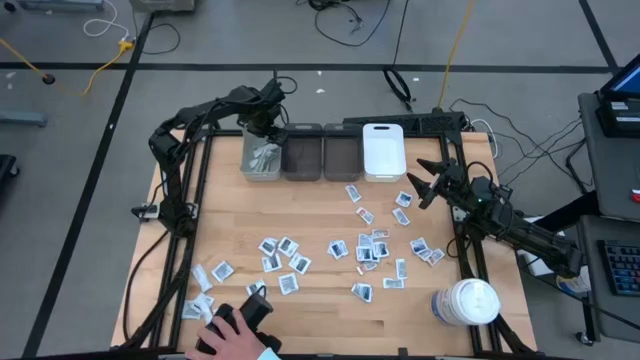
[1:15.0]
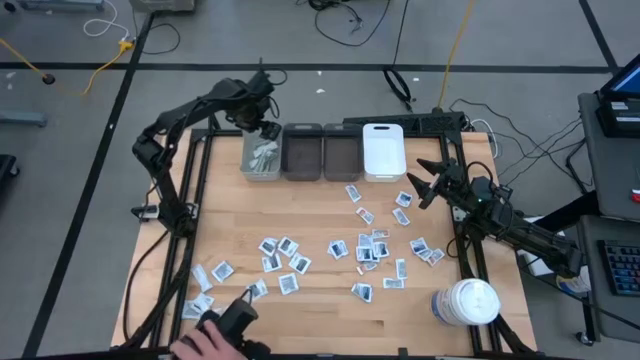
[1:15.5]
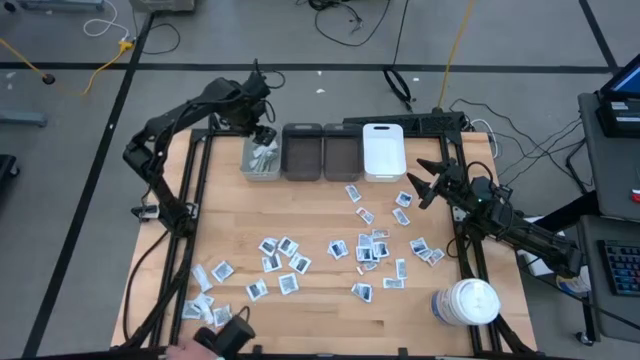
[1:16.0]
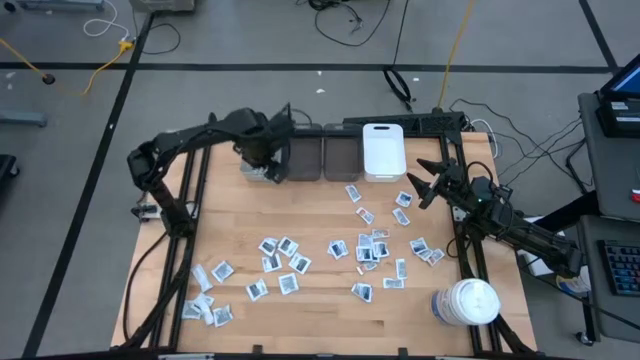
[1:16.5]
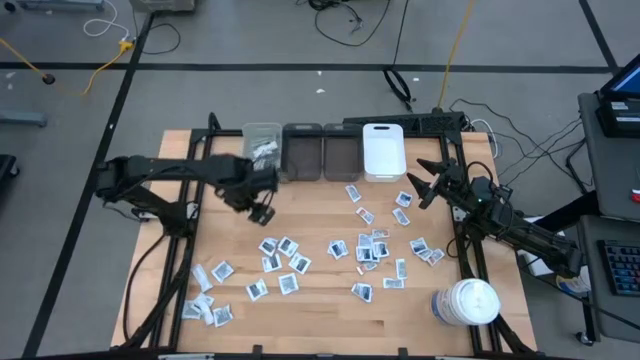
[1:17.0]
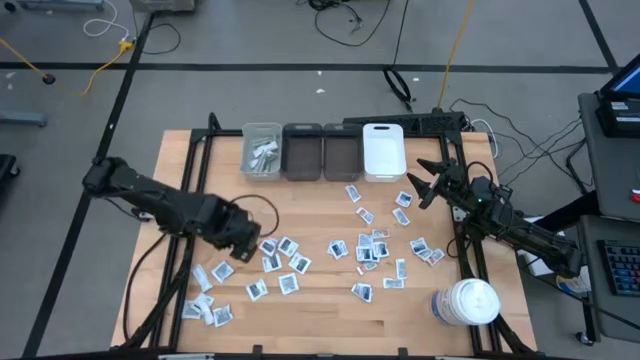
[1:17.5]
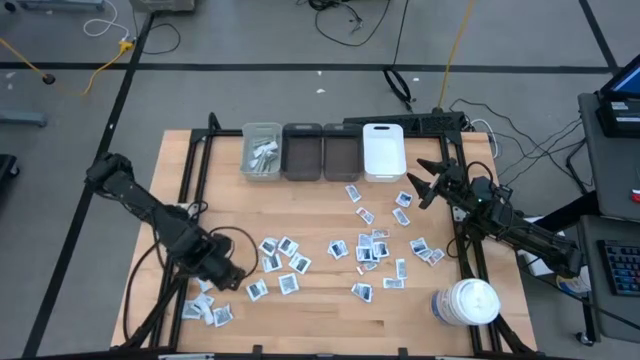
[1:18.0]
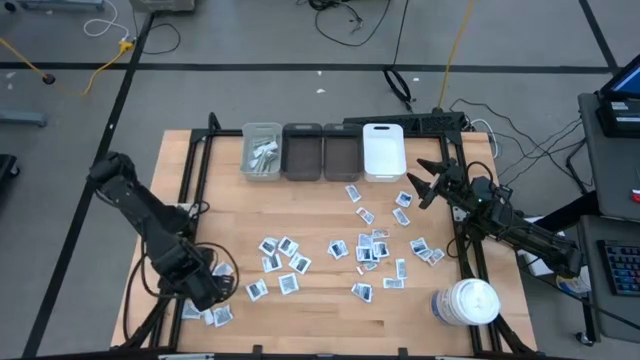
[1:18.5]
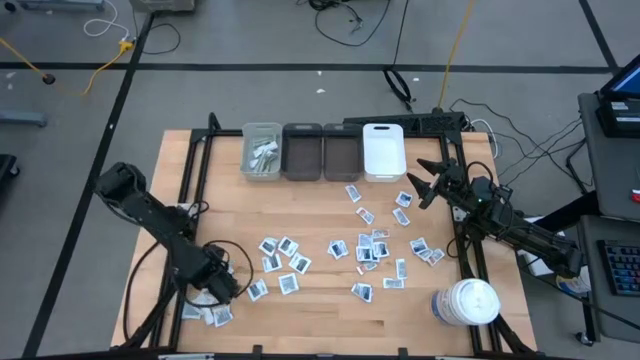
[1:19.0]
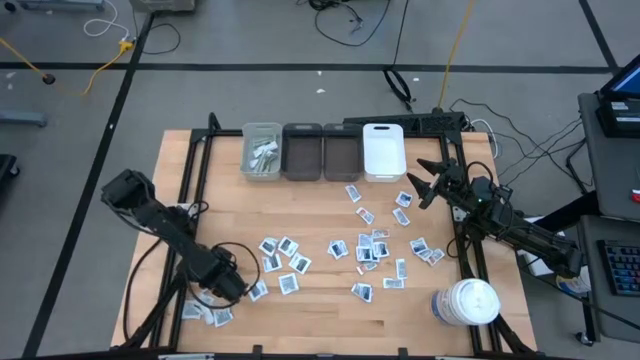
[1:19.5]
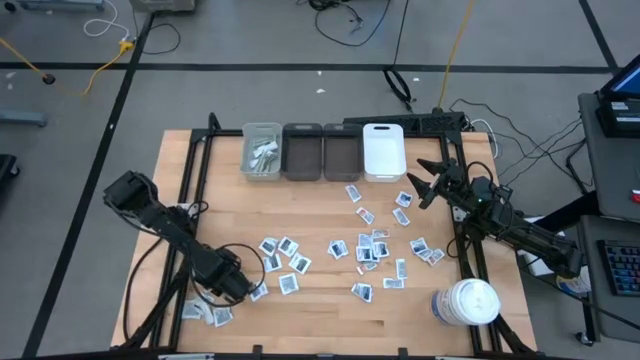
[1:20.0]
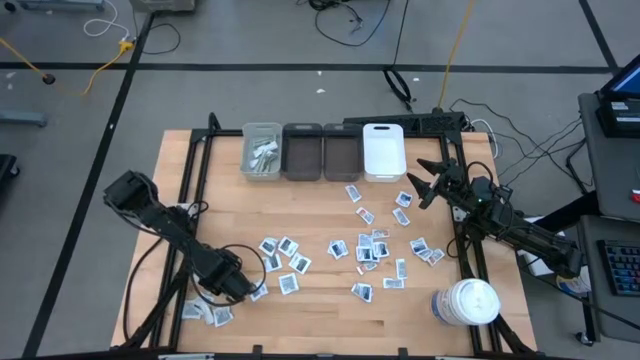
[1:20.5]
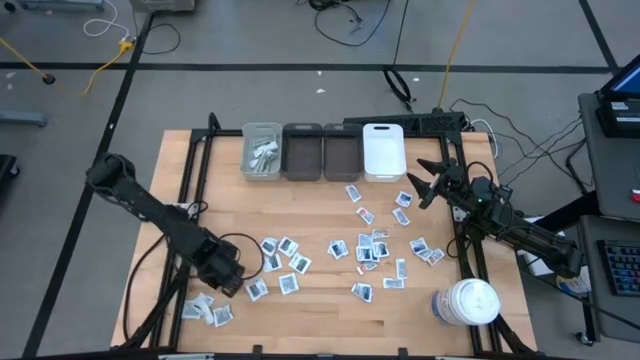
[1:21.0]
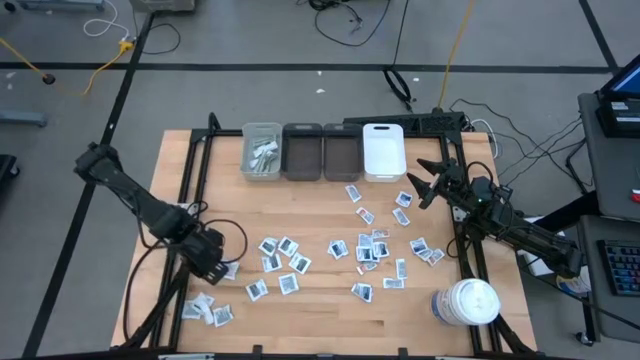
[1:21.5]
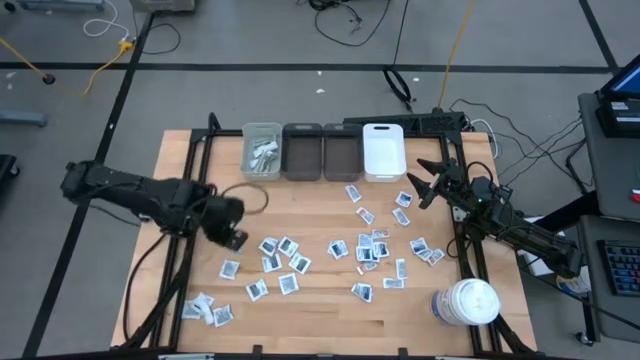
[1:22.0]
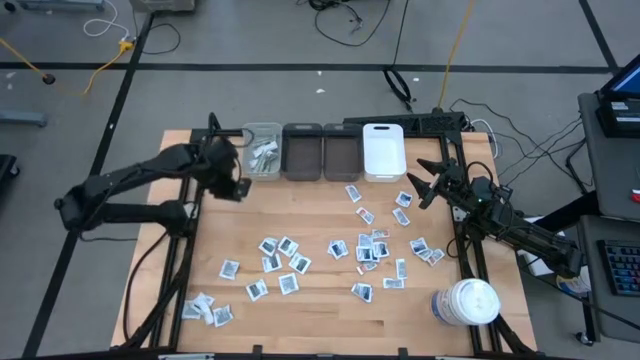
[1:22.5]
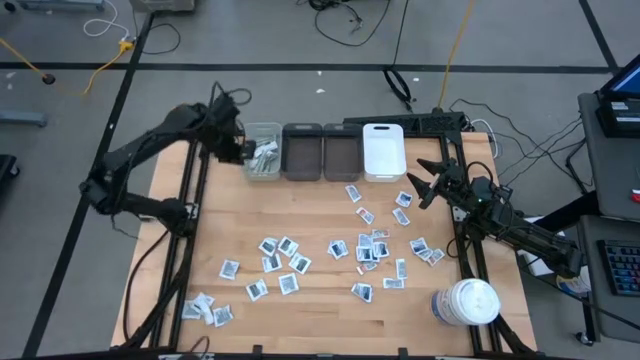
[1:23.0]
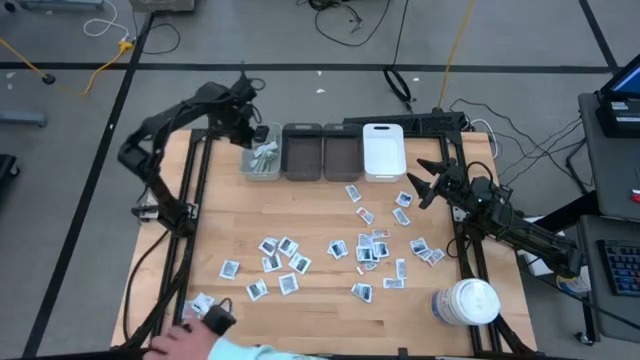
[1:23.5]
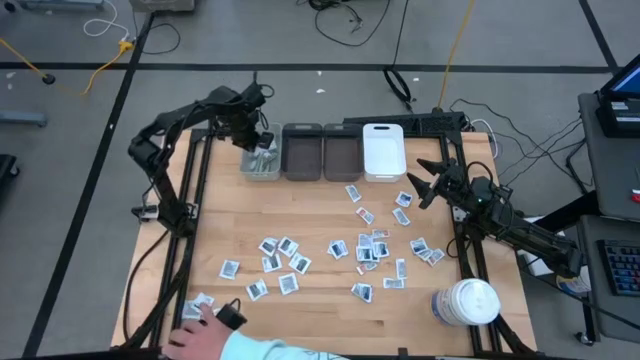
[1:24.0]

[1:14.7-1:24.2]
Task: Pick & Place First Aid Supplies
Put the bandage into the gray bin

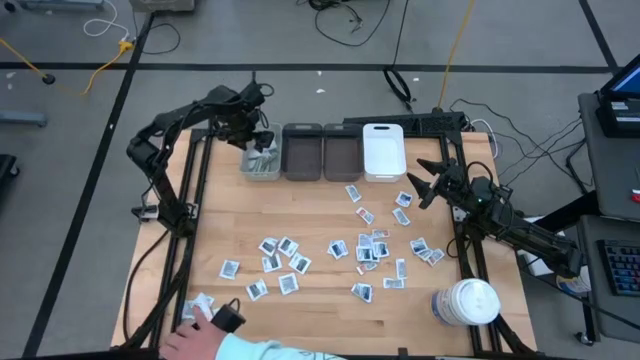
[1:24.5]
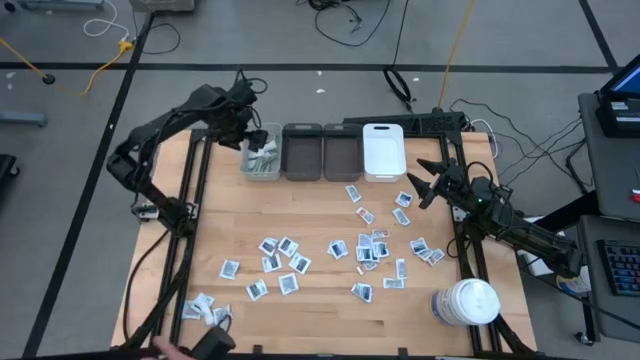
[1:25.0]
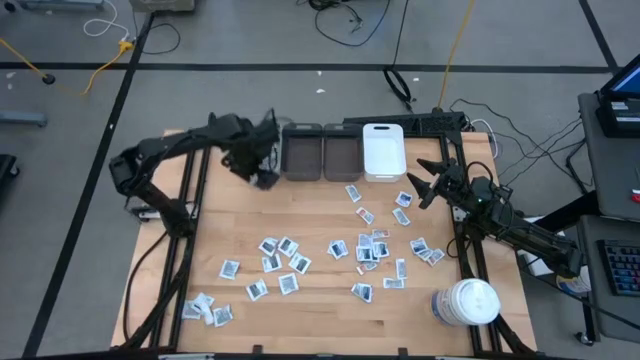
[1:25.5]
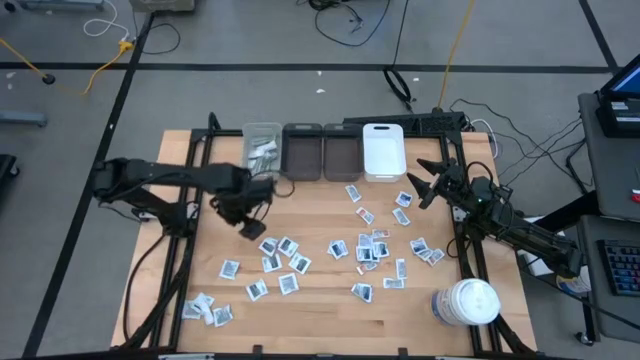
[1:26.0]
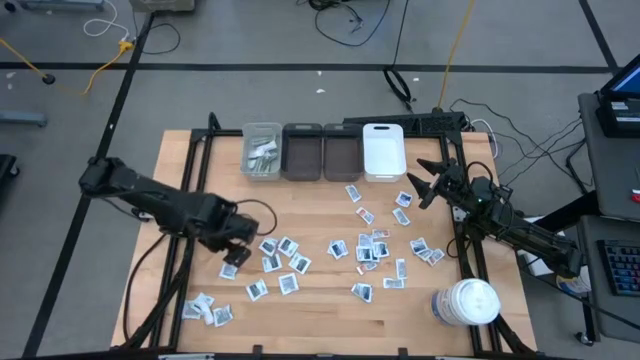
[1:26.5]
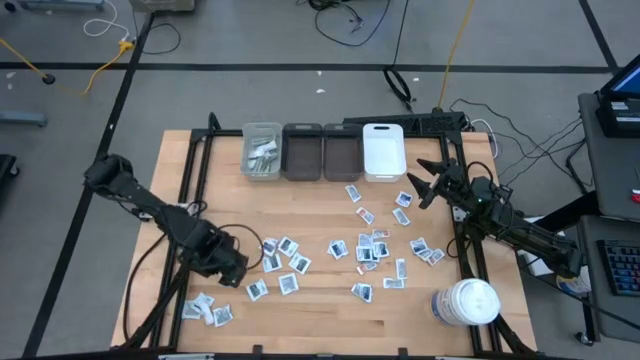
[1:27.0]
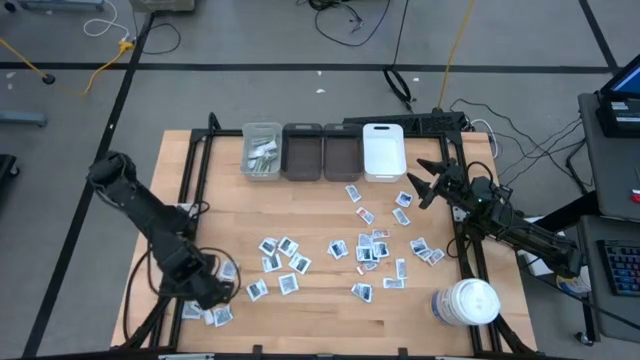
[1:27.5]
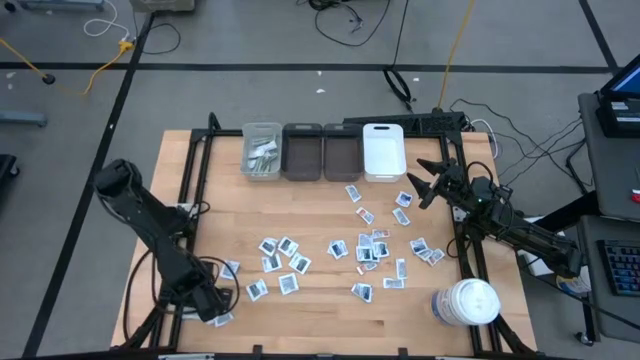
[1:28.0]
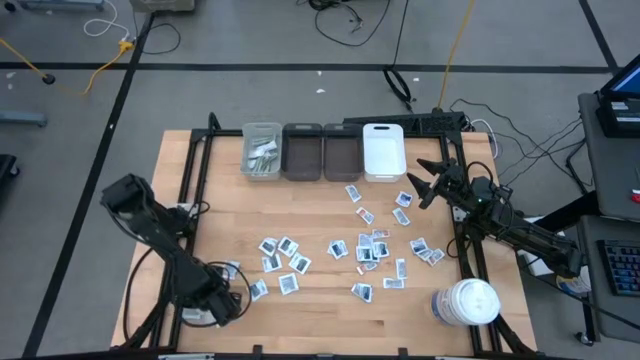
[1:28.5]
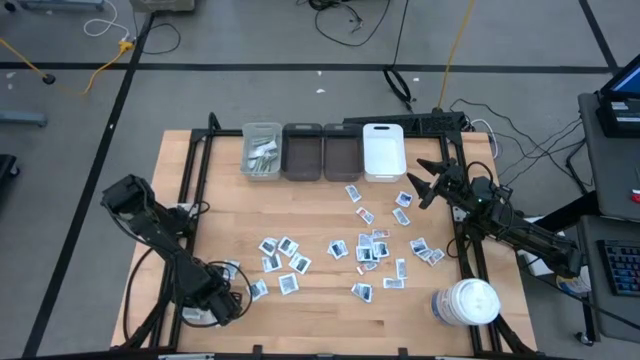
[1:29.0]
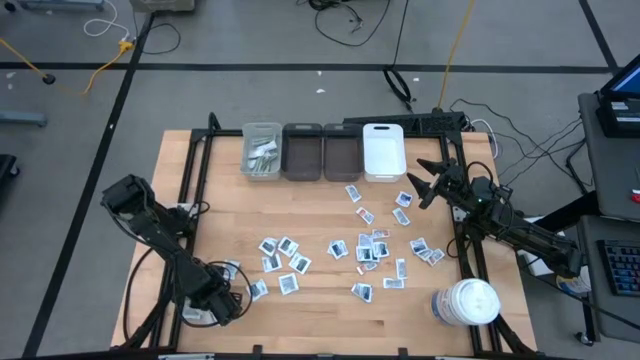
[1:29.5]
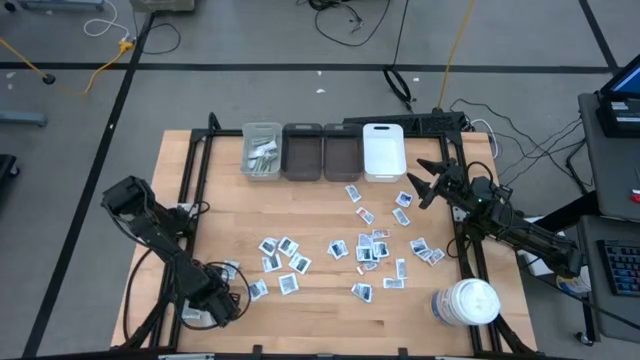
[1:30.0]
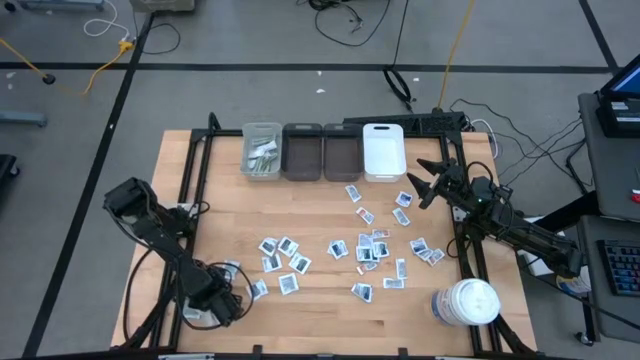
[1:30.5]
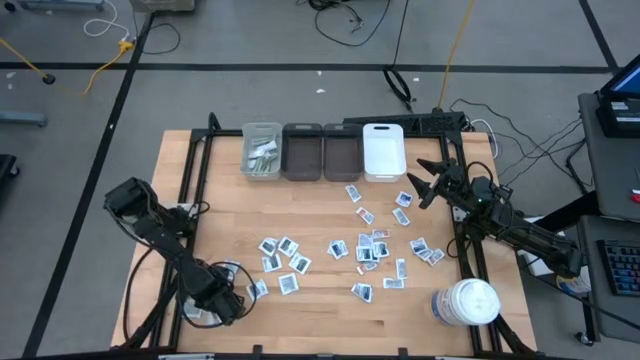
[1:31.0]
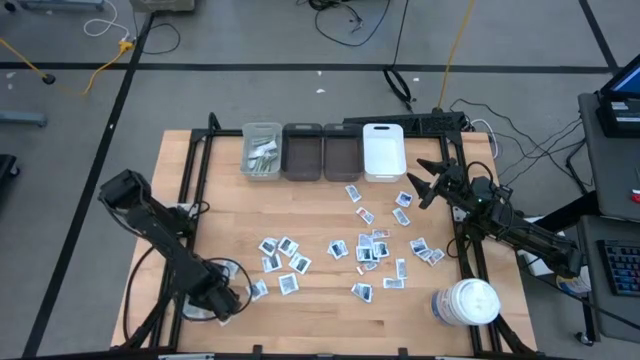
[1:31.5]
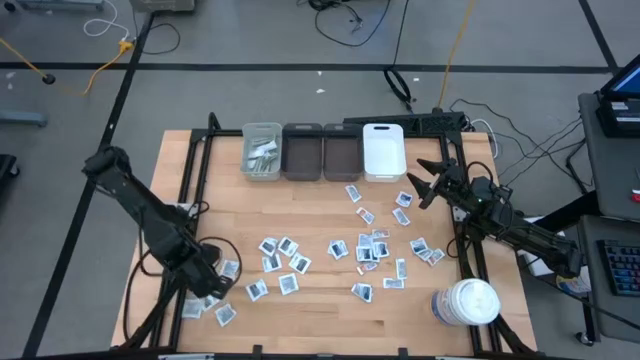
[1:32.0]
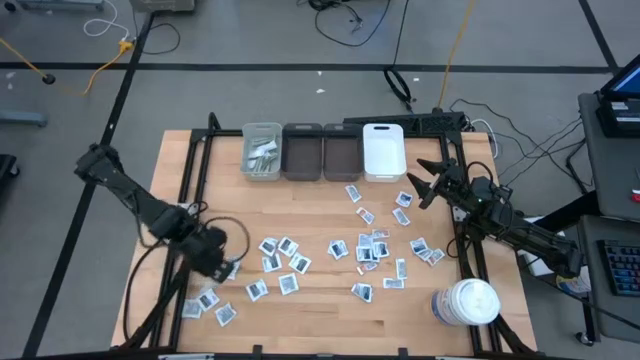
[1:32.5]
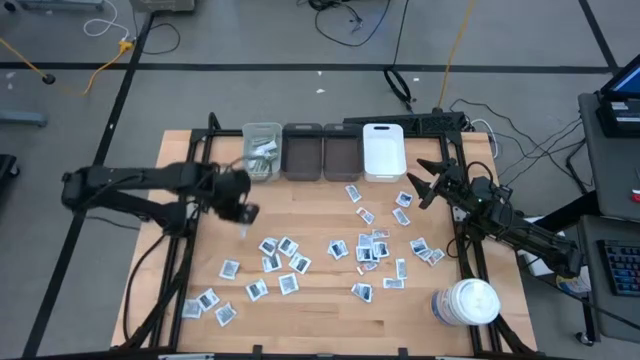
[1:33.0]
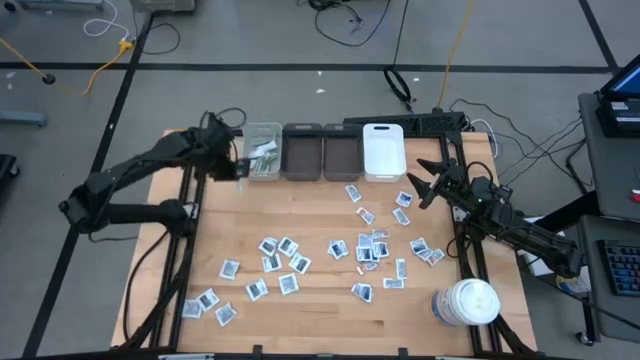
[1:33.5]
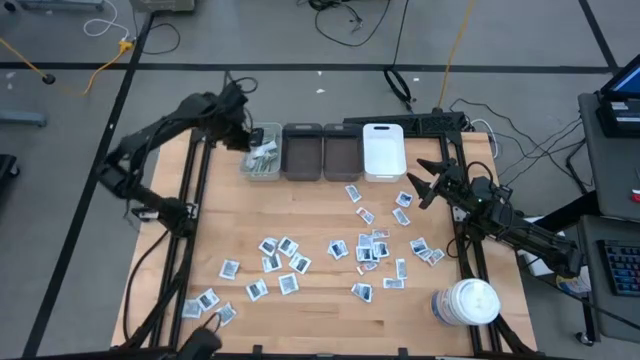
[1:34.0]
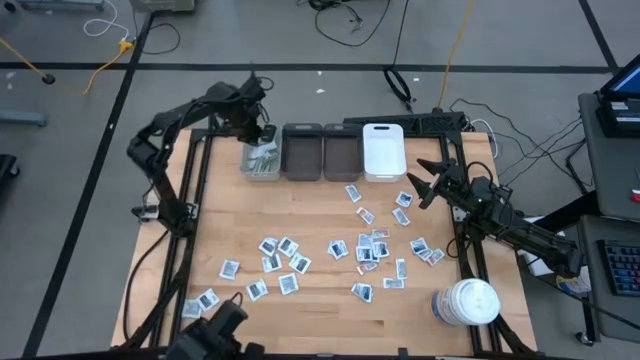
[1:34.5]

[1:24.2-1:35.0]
Put the bandage into the gray bin

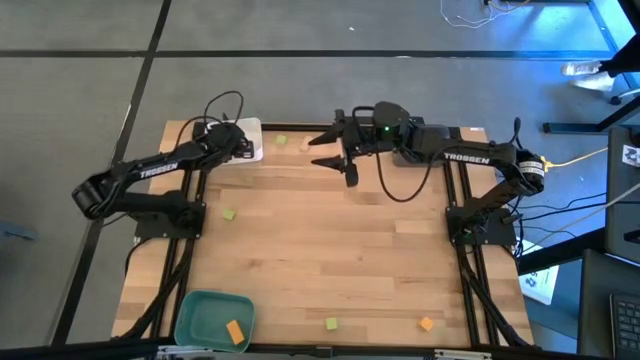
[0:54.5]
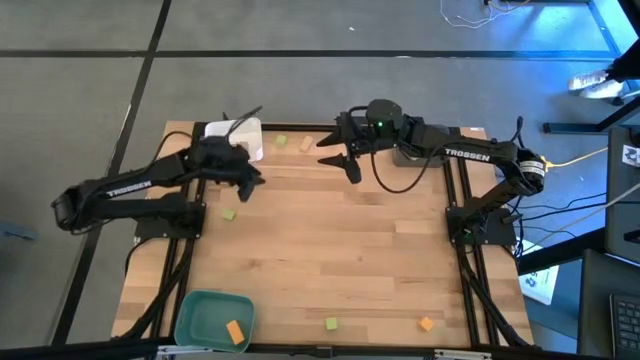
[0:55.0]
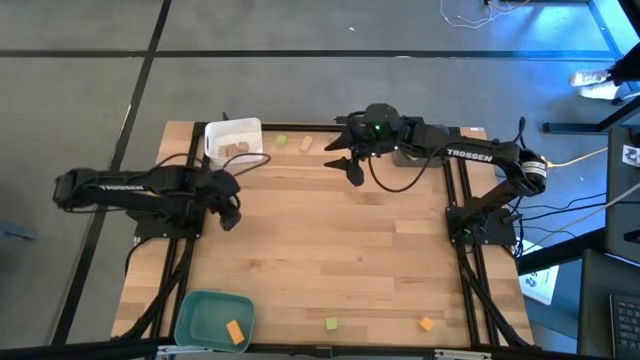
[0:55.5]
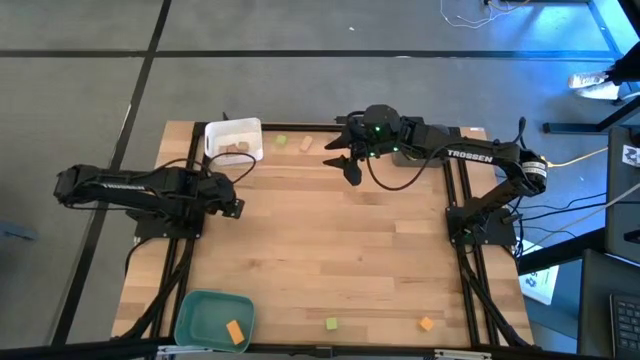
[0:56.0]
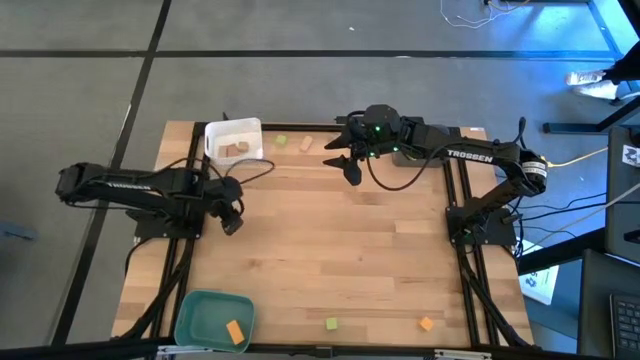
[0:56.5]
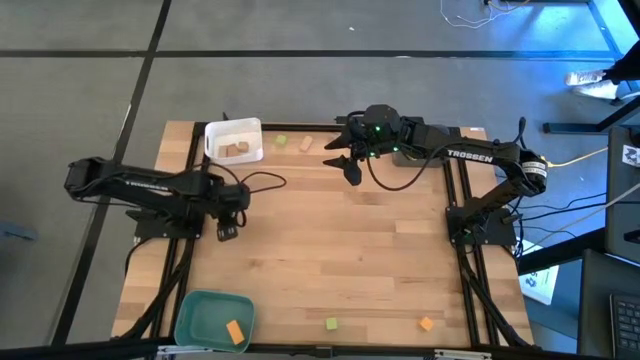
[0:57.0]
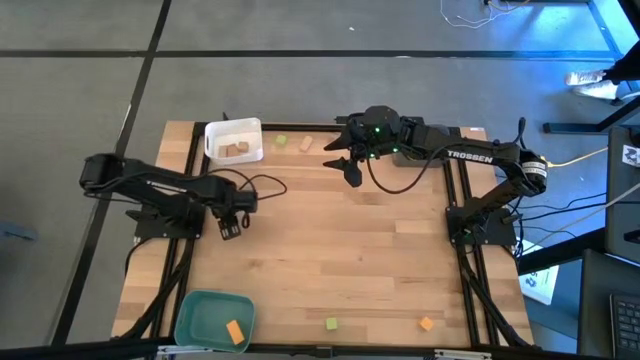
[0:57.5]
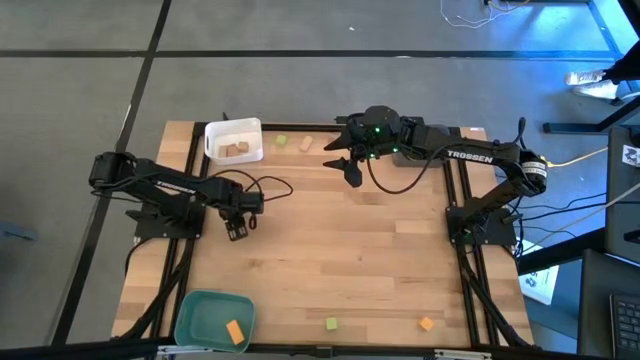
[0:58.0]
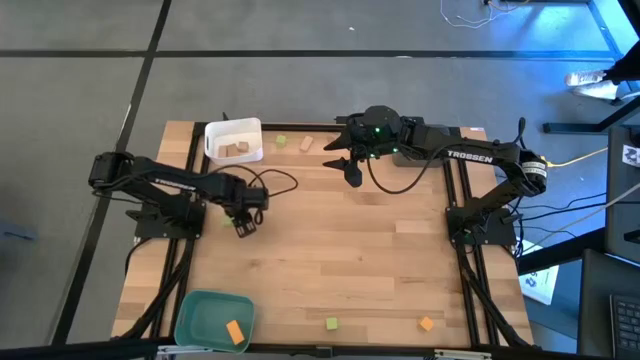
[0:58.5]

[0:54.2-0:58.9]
Task: Sort & place blocks by color
Put the green block into the black bin
